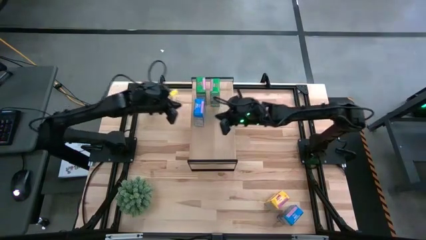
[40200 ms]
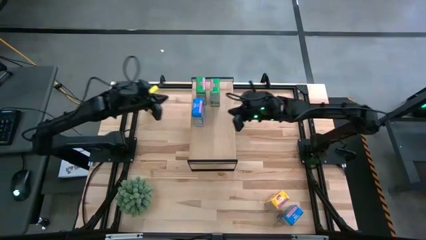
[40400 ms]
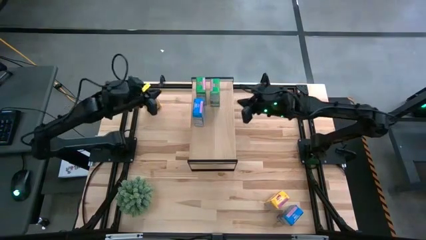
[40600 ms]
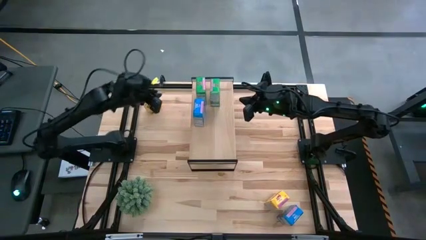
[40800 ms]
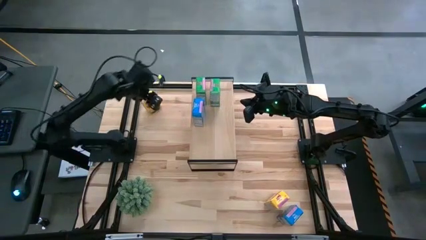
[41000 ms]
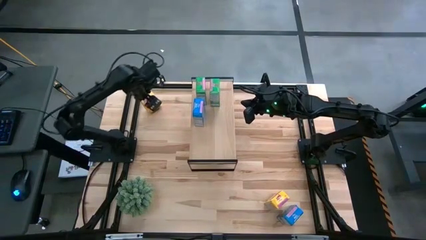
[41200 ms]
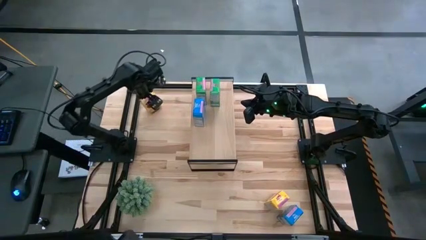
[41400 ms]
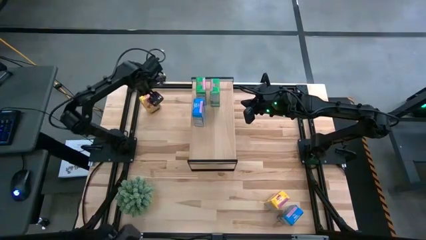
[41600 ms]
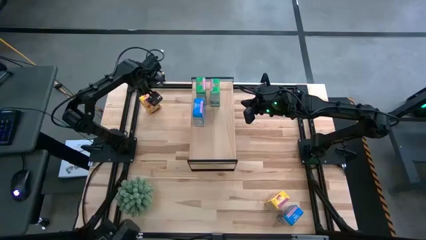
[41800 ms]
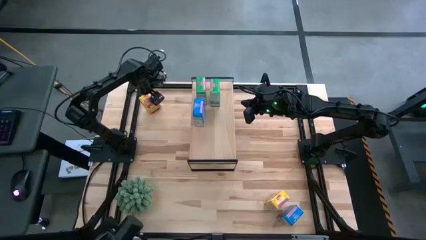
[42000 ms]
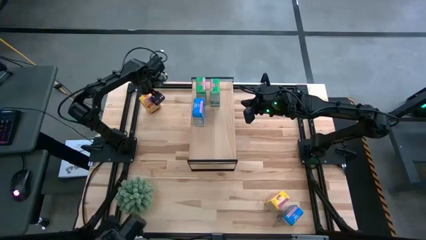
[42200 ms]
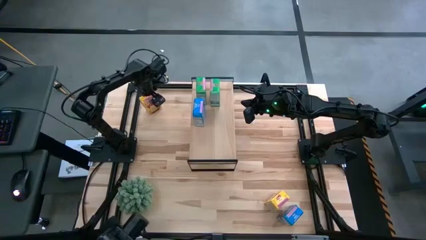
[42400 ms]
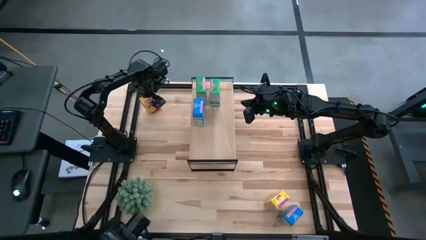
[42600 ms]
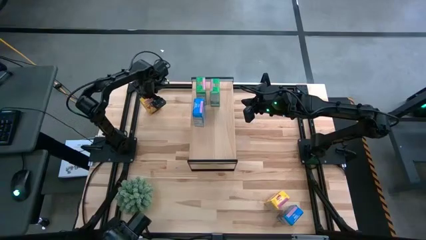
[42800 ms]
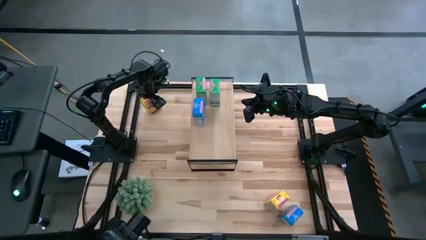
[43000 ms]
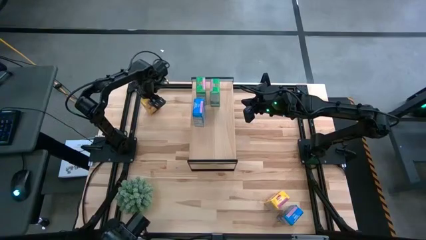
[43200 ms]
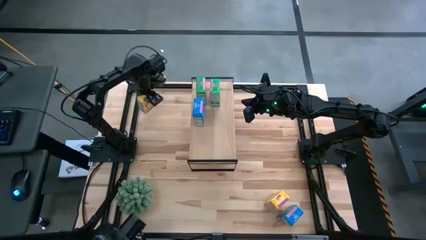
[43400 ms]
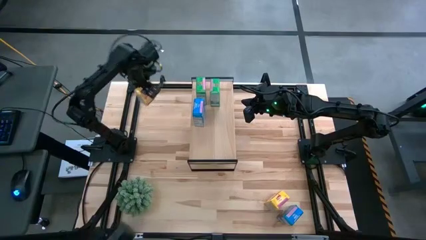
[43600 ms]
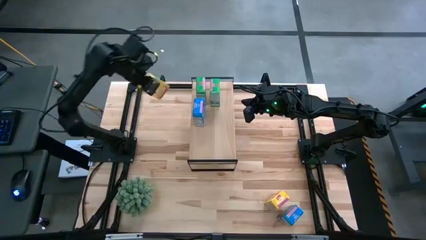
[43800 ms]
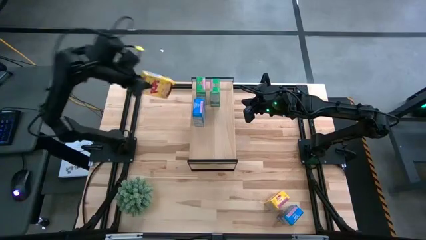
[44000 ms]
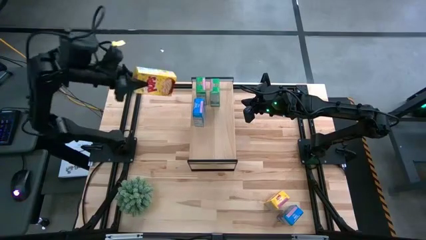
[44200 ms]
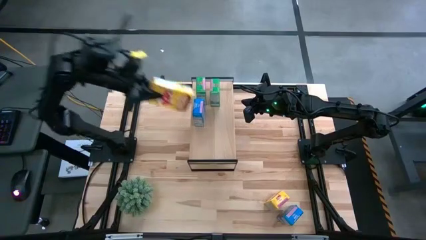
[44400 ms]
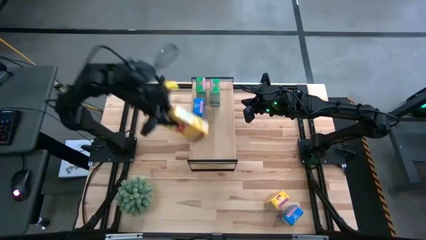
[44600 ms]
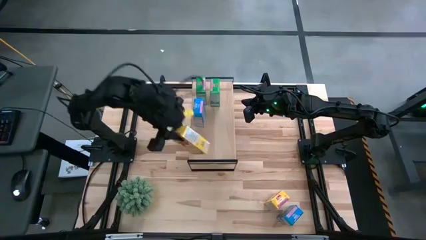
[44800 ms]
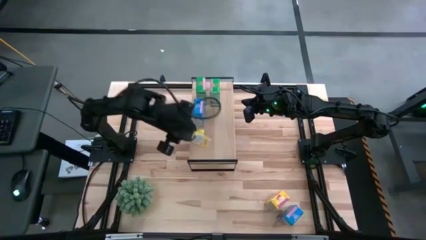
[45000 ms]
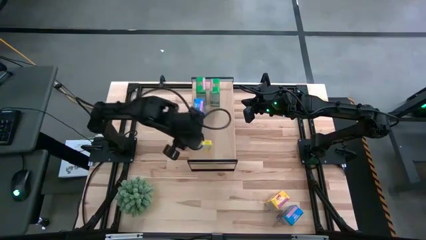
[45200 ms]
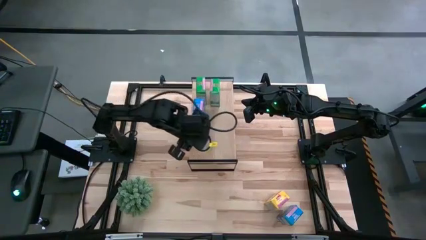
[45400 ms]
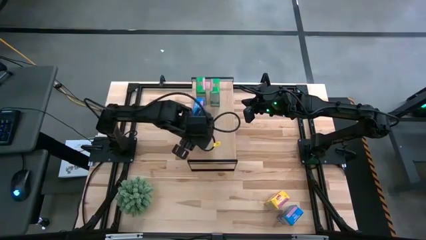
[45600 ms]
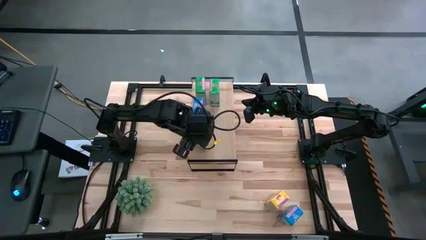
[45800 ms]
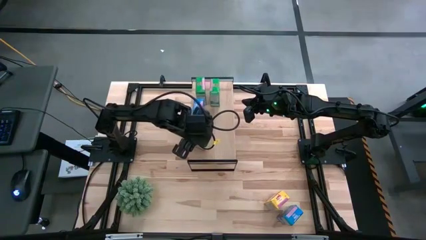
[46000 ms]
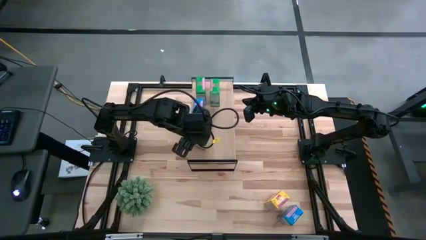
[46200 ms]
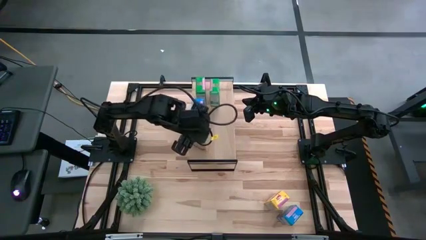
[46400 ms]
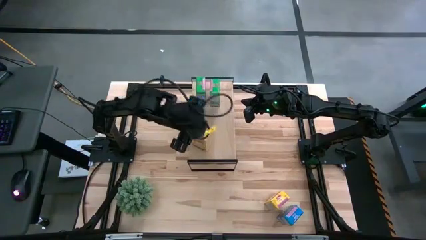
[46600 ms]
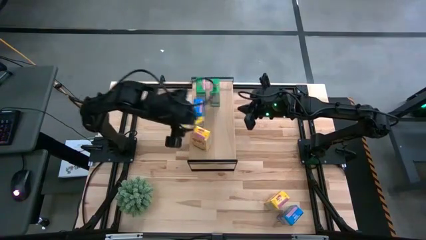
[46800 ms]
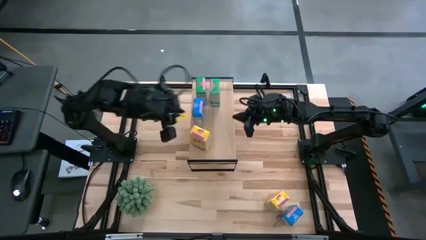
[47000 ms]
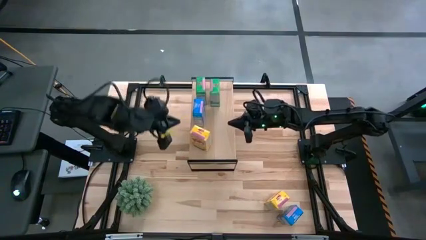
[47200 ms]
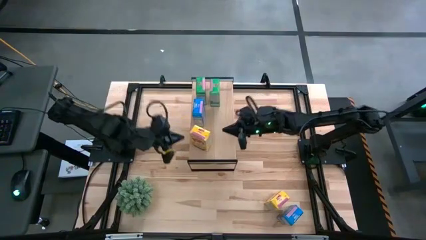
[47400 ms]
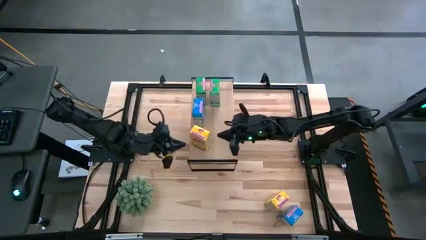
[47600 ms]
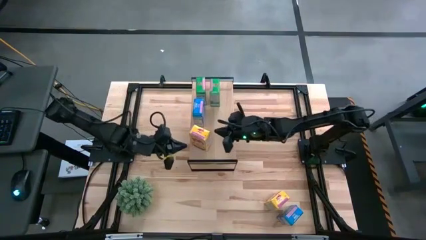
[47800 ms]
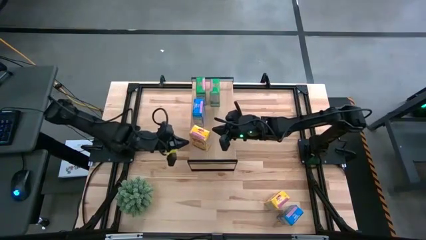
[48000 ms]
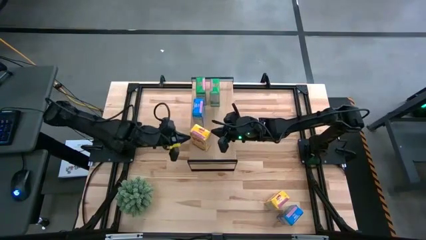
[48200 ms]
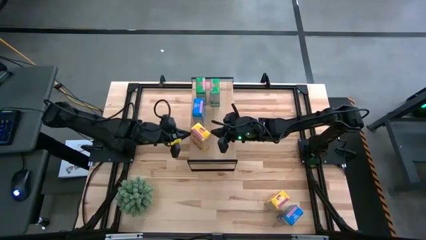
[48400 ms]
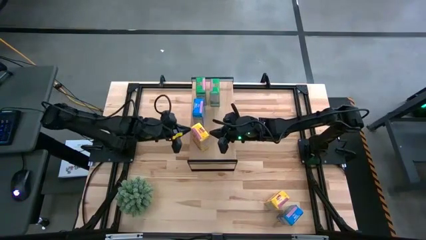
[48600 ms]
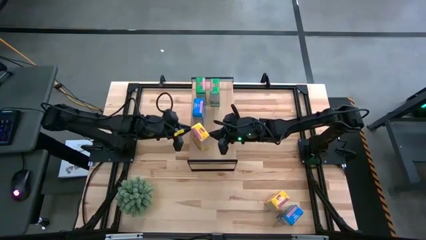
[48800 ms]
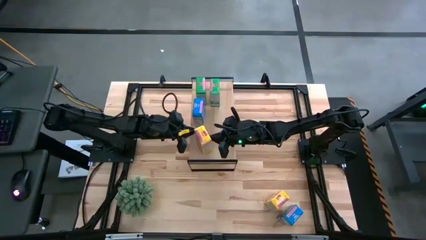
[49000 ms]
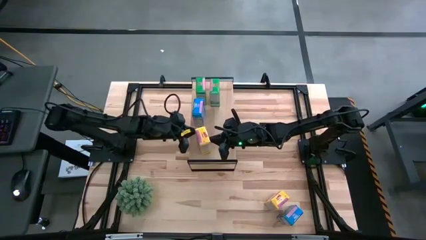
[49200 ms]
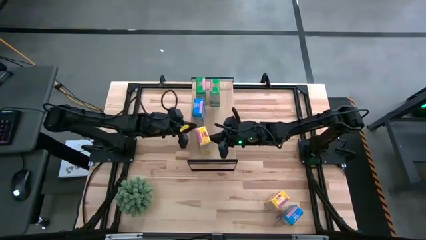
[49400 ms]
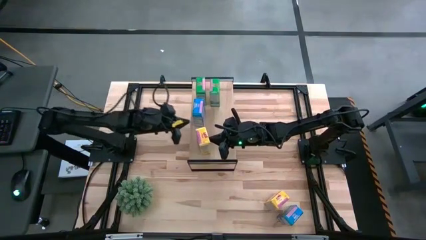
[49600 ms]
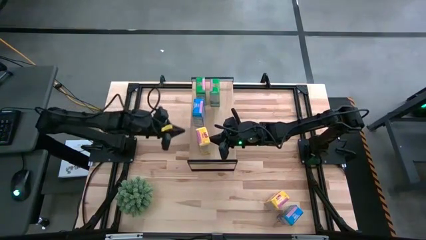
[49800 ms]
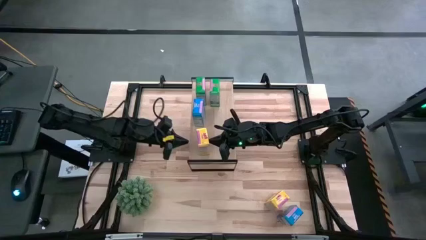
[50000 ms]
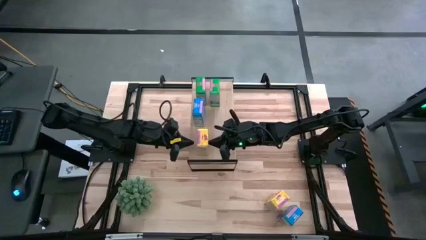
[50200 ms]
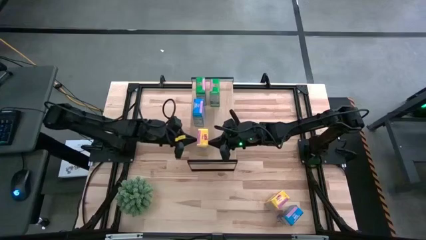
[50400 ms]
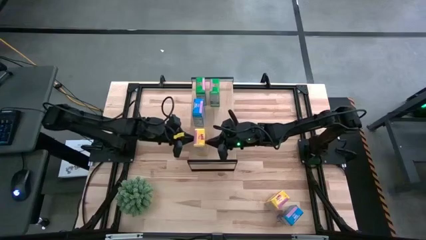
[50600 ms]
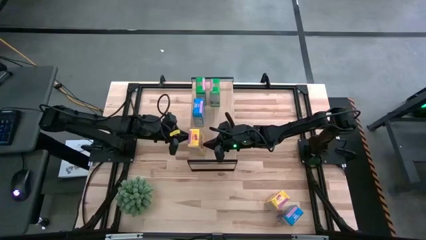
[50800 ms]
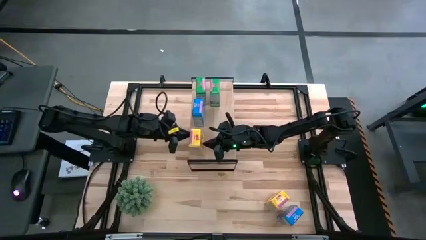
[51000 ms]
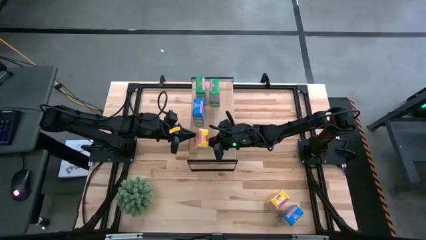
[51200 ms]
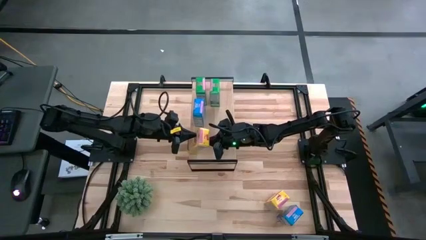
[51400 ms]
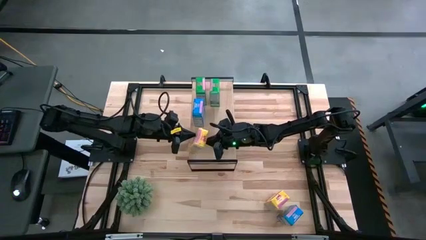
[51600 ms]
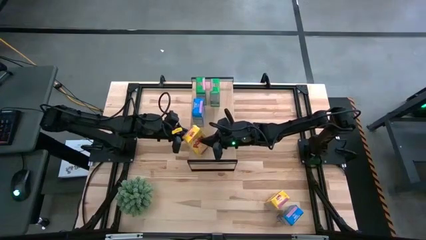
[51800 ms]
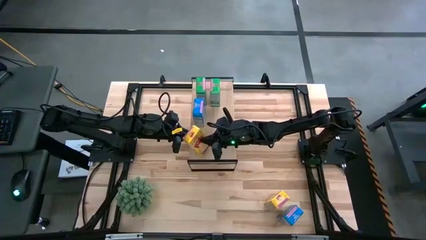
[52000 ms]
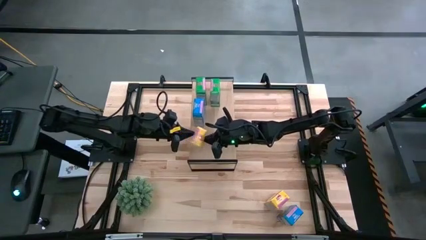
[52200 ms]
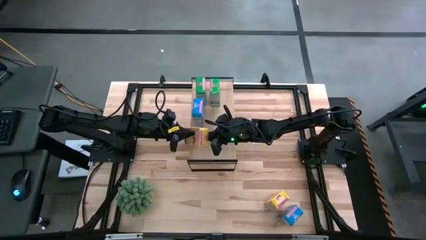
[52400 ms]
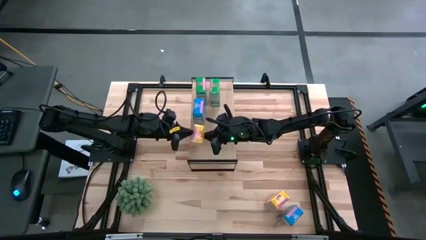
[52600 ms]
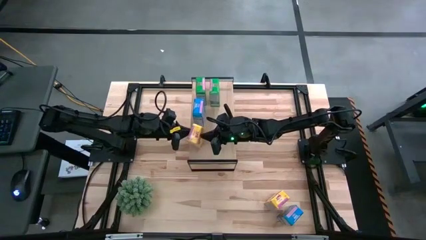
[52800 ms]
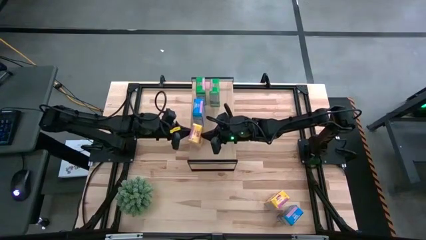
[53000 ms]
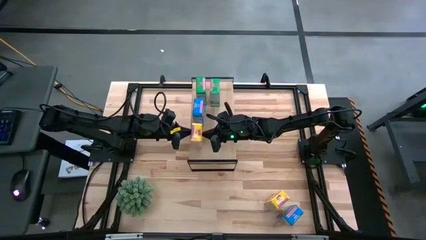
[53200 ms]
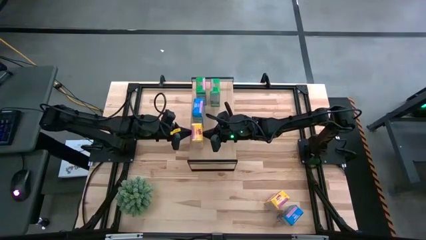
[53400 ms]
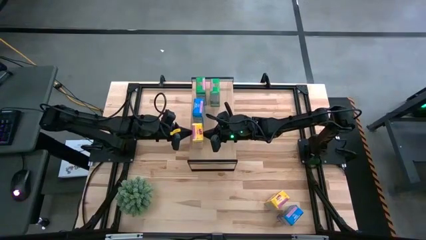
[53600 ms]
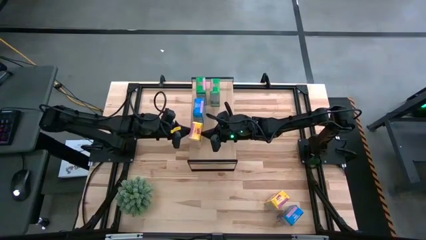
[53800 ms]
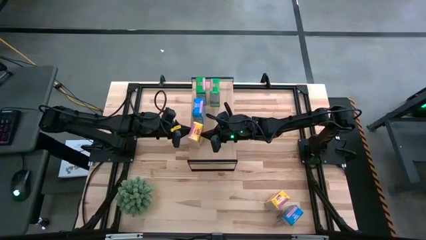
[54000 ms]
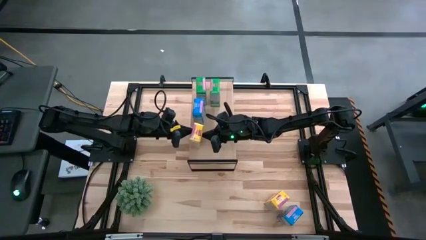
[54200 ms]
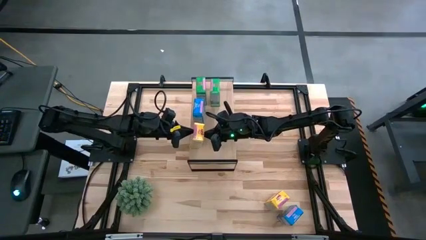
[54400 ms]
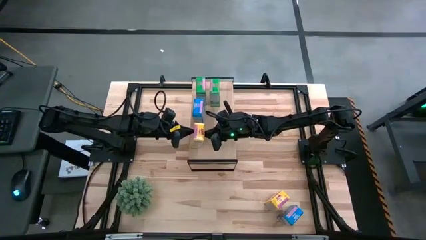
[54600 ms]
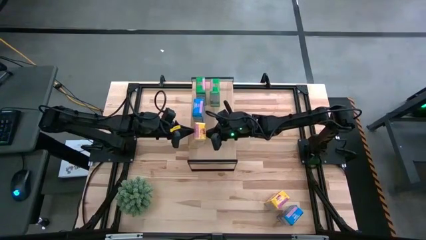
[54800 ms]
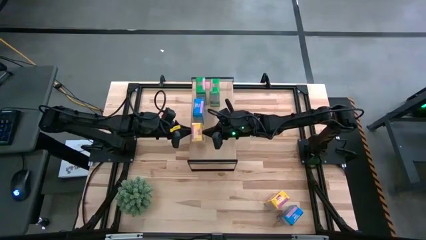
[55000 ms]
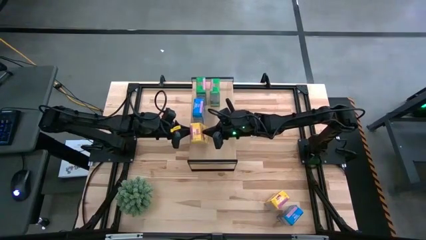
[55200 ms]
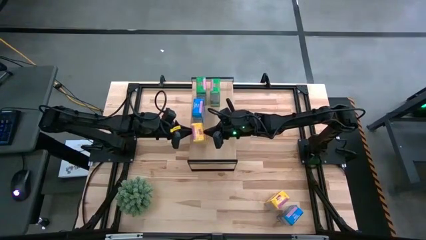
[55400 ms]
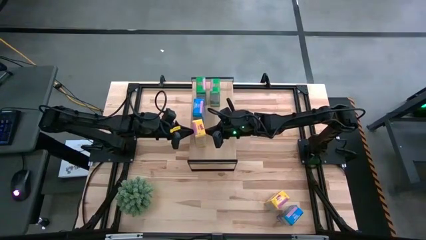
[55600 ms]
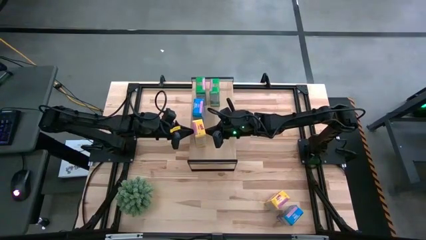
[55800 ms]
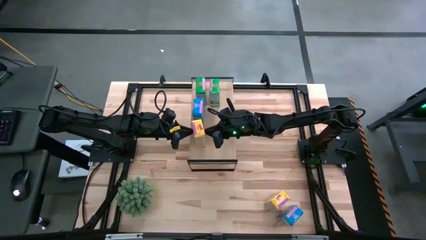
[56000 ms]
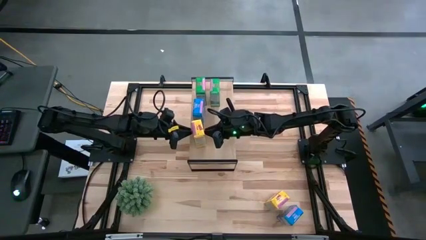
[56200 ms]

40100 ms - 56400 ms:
Task: Stack cereal on shelf
Put the left yellow cereal on the shelf
